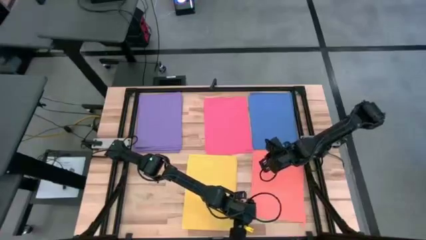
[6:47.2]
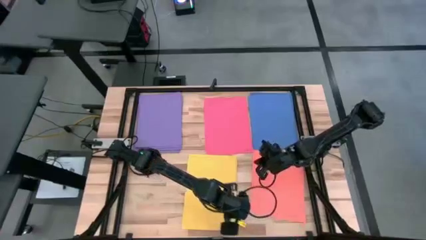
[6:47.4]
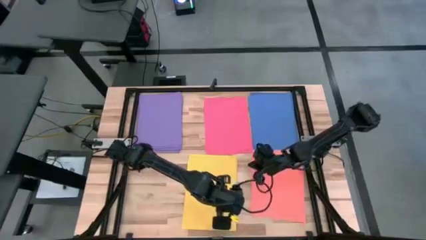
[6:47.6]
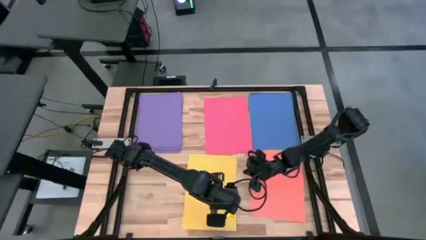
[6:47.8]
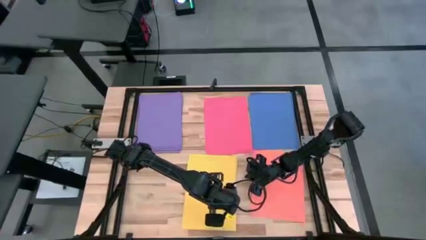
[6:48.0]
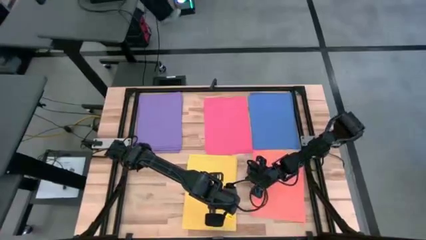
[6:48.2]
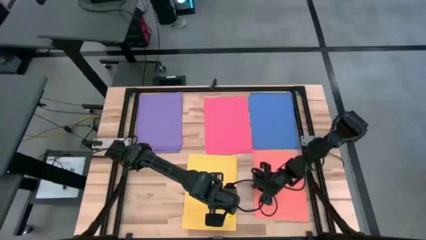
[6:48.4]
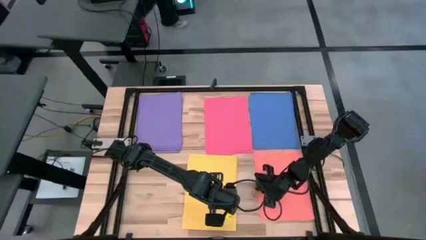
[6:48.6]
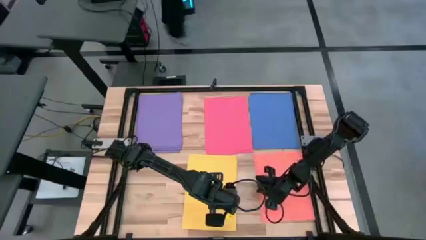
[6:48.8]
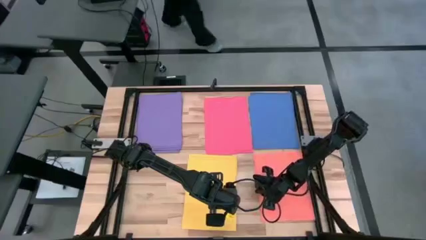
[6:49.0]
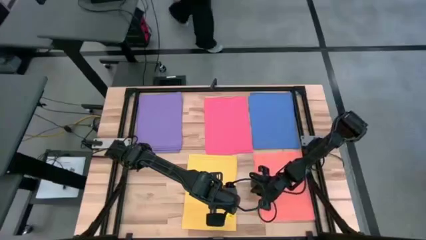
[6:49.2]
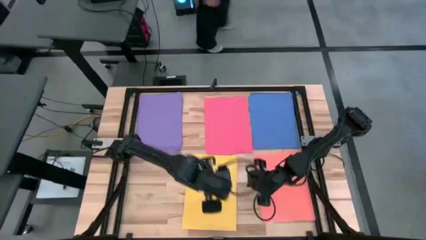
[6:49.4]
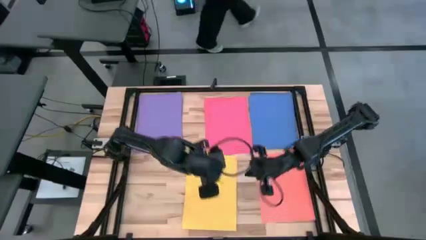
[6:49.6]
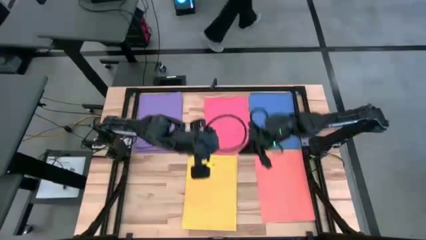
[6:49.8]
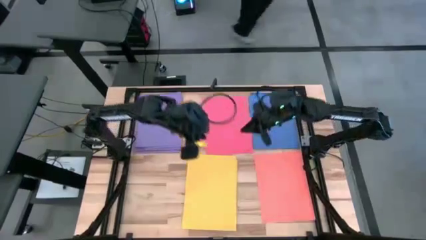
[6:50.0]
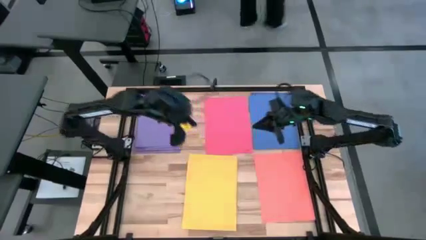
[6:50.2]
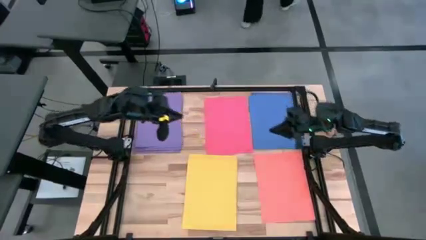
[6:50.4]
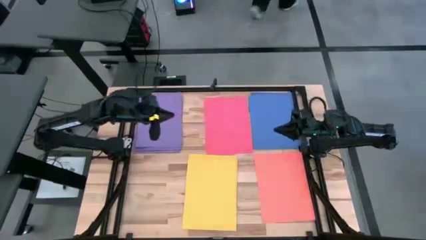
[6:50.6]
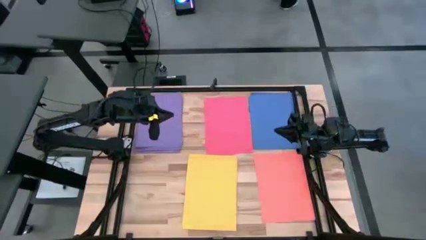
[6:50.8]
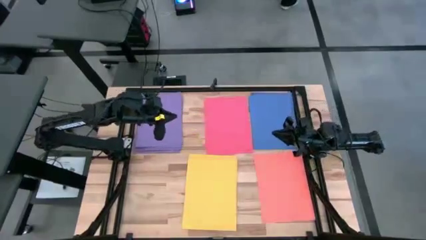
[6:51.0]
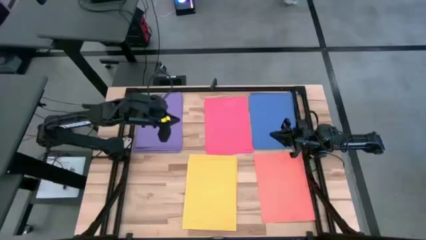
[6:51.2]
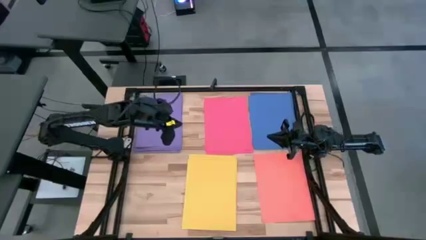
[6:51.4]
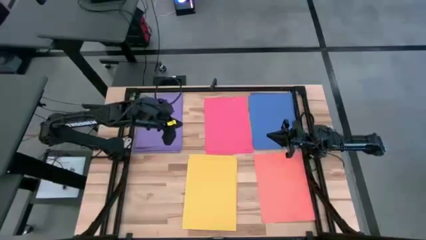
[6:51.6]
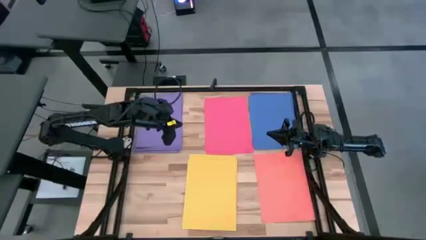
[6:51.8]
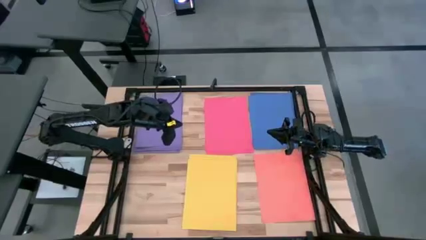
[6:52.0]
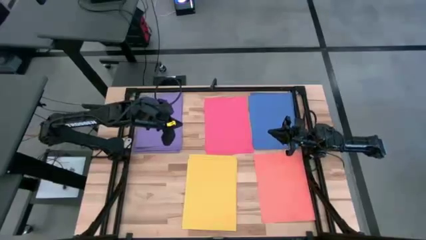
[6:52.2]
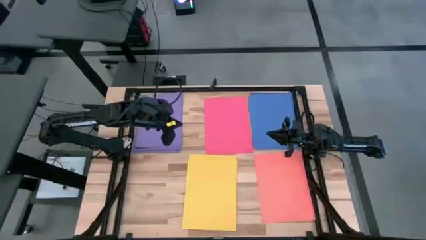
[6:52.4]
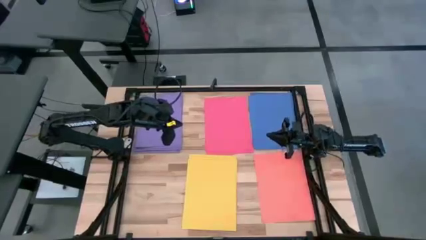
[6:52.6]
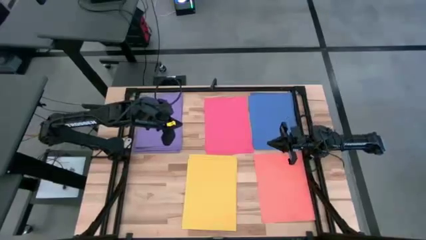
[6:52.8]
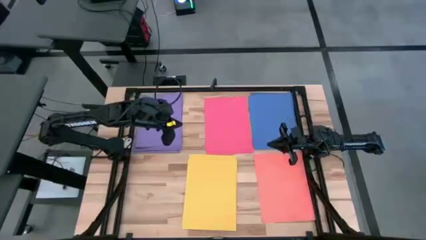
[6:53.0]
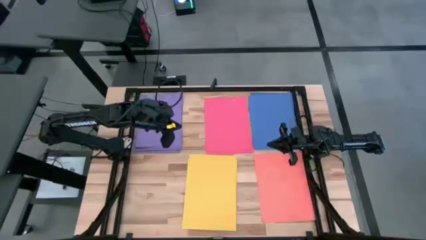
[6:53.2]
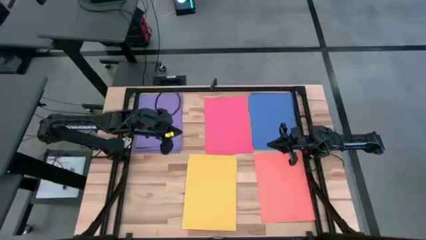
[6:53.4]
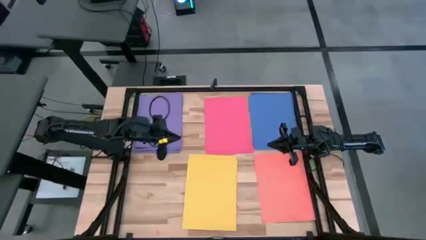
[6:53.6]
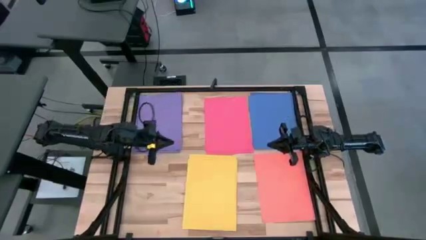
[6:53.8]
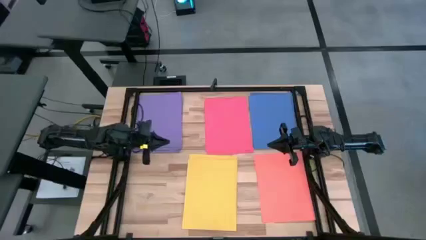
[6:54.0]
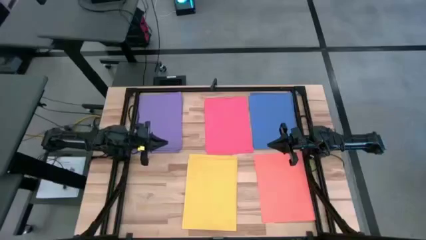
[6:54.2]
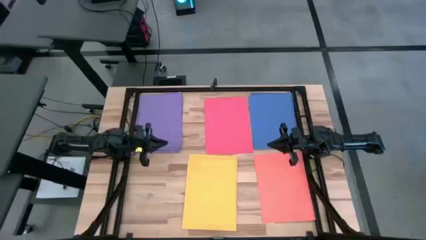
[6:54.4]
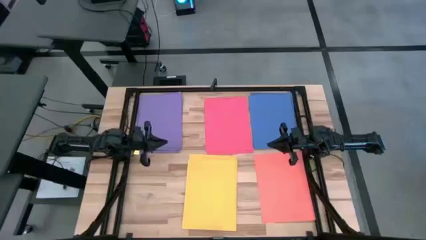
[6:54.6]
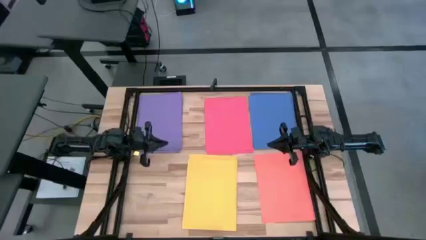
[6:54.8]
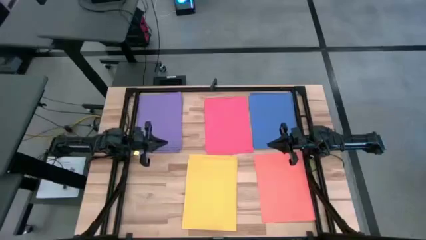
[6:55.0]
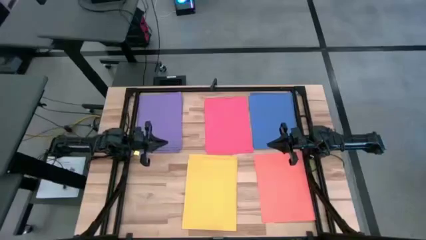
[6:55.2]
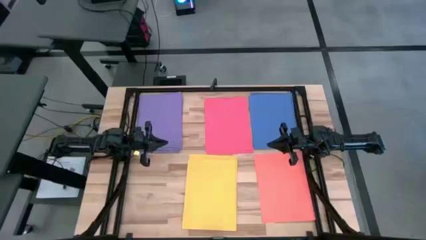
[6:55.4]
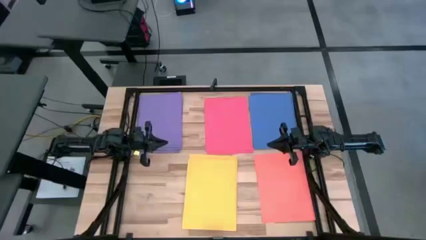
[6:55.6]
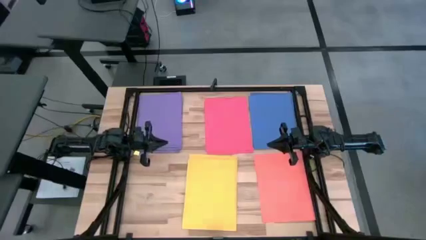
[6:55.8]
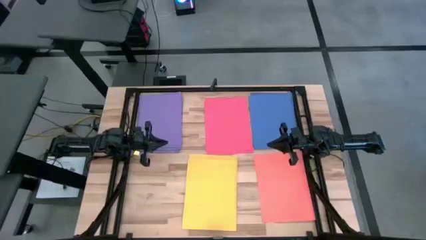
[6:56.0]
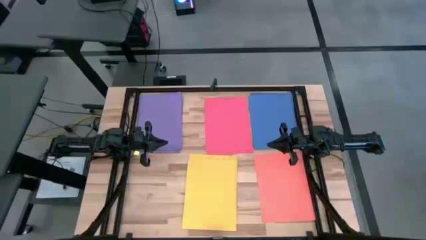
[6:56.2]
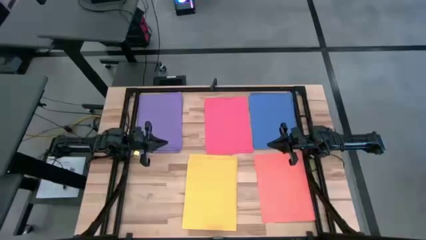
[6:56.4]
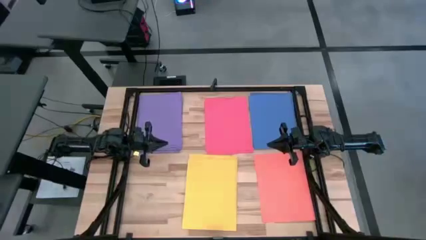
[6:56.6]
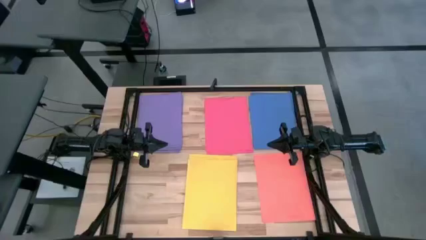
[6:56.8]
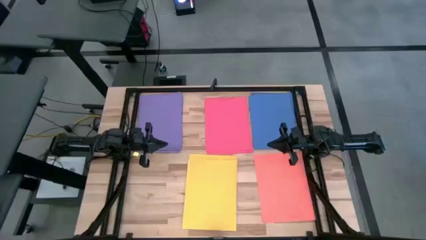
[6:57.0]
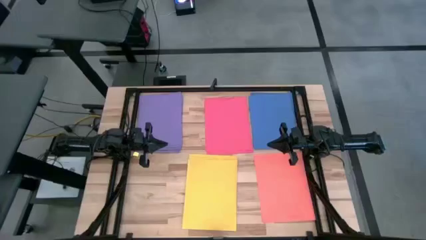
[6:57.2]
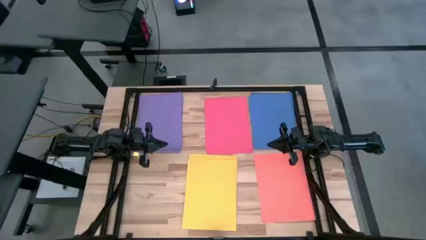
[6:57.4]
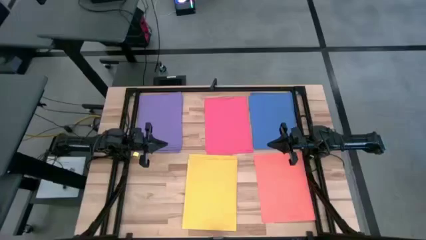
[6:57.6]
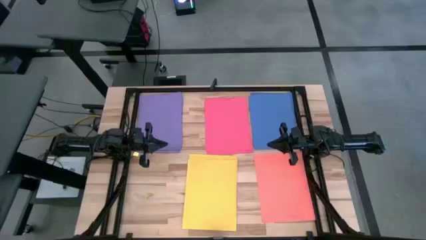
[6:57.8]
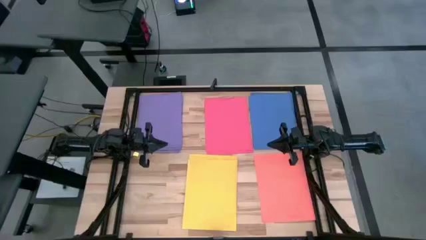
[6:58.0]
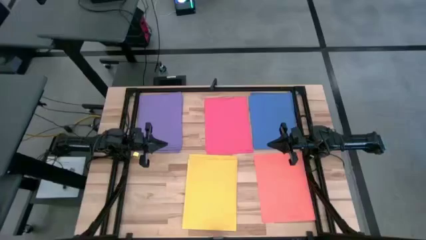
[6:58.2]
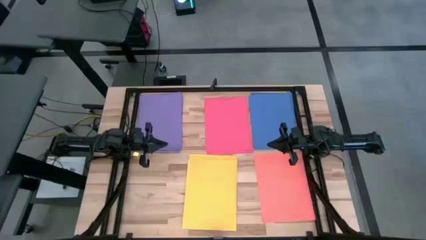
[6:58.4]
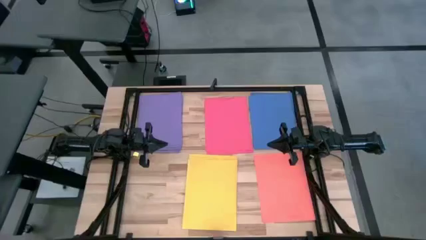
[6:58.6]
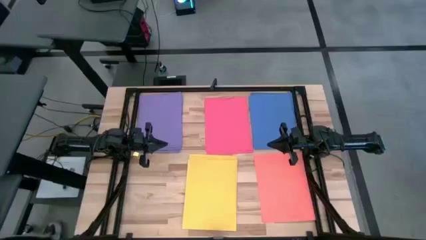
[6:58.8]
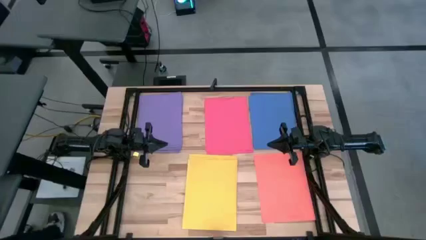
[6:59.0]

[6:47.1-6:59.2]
Task: Organize paper
Return to Home Position

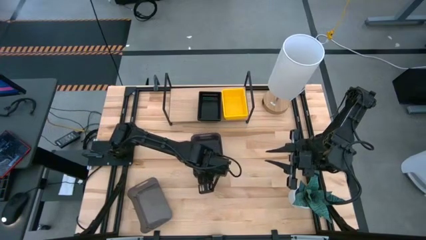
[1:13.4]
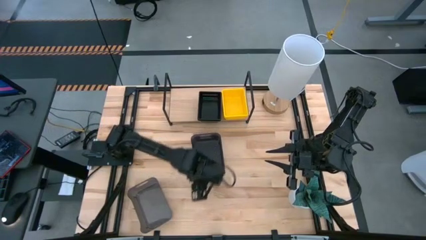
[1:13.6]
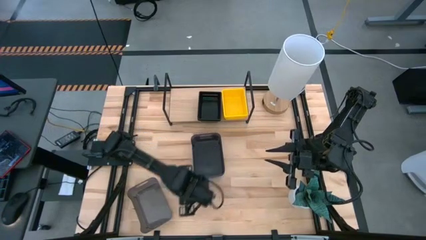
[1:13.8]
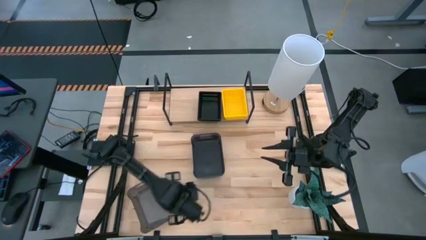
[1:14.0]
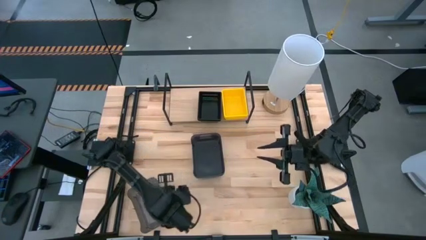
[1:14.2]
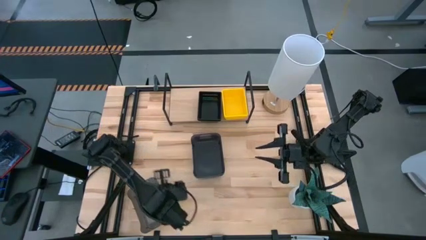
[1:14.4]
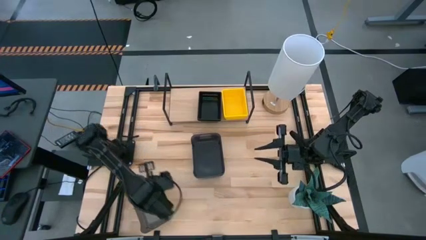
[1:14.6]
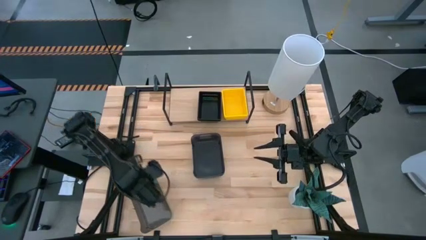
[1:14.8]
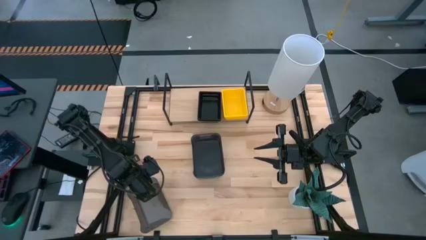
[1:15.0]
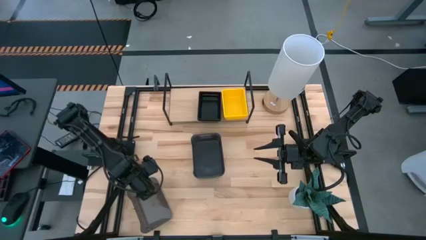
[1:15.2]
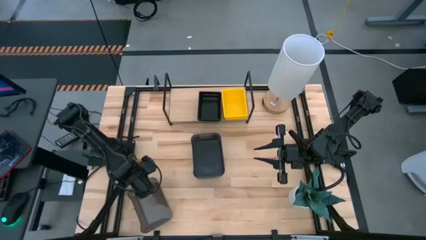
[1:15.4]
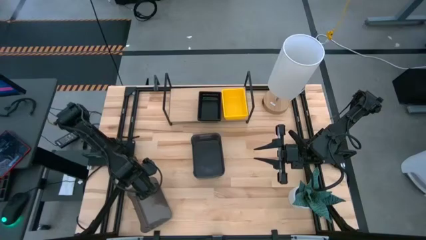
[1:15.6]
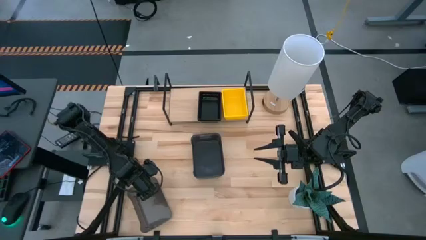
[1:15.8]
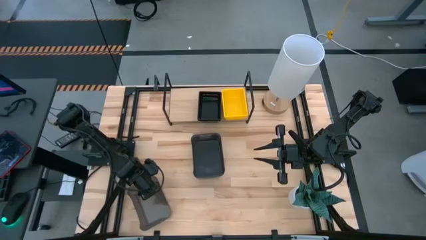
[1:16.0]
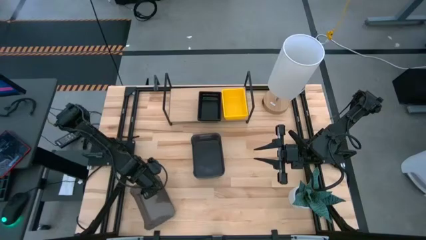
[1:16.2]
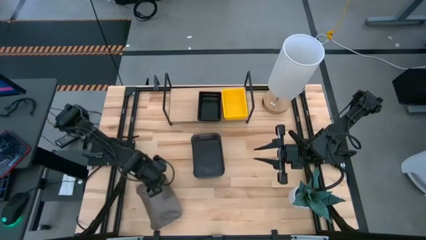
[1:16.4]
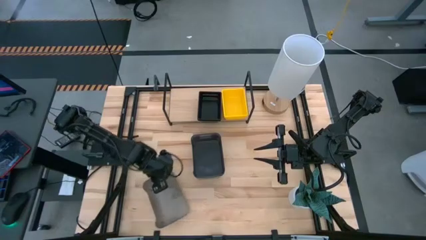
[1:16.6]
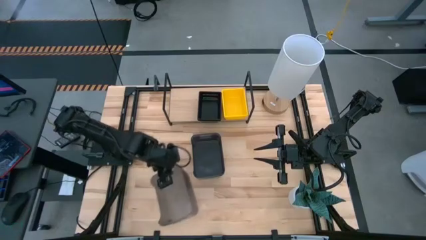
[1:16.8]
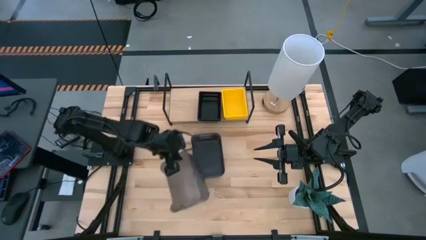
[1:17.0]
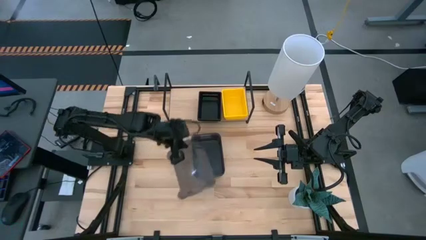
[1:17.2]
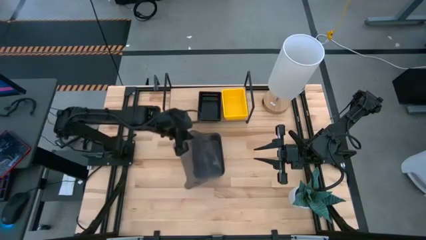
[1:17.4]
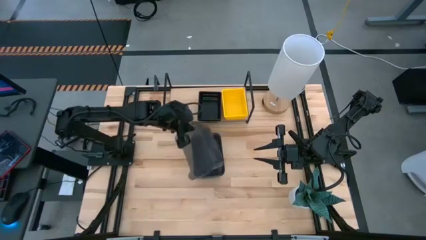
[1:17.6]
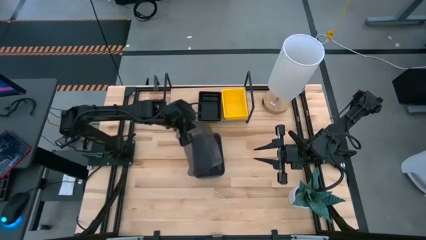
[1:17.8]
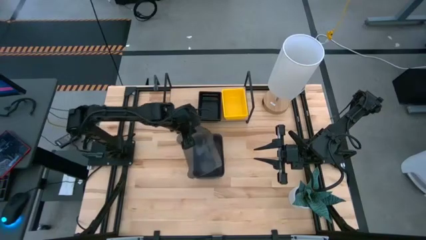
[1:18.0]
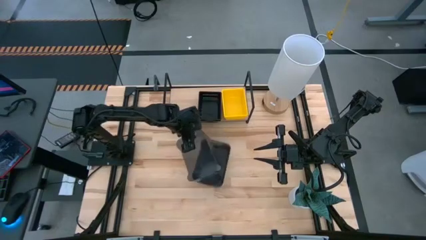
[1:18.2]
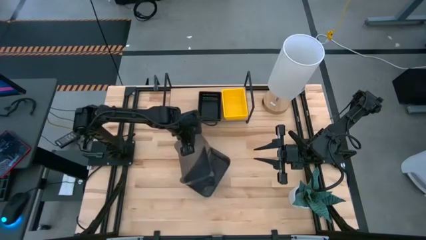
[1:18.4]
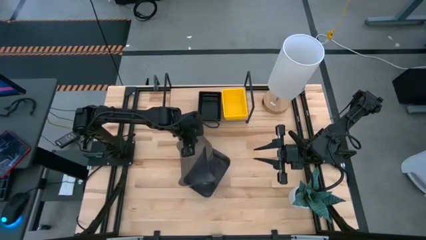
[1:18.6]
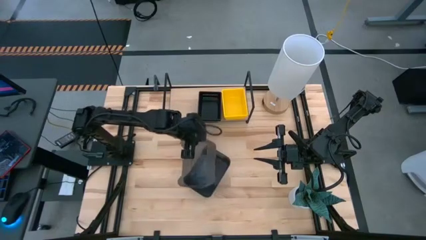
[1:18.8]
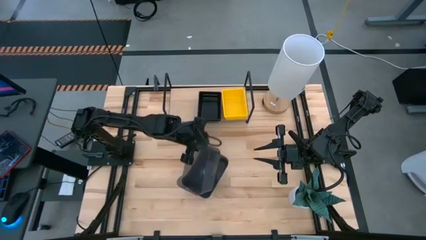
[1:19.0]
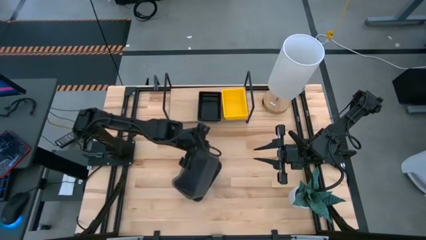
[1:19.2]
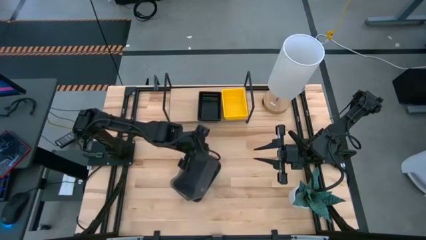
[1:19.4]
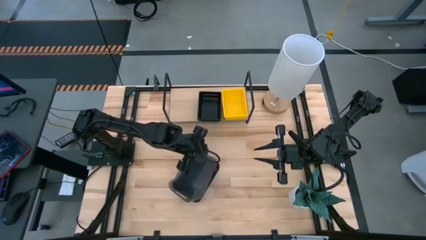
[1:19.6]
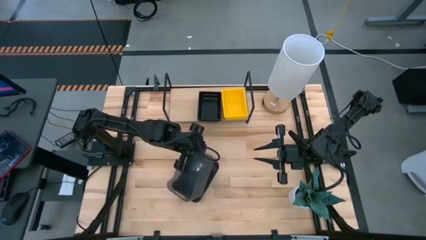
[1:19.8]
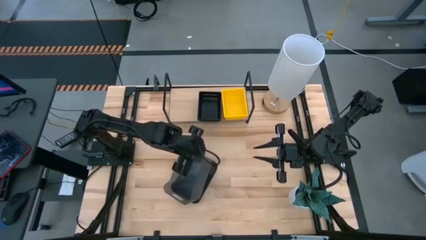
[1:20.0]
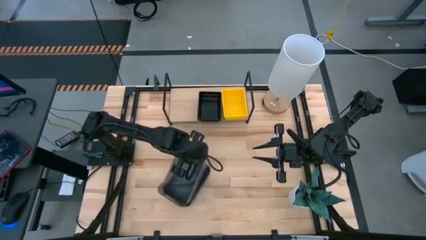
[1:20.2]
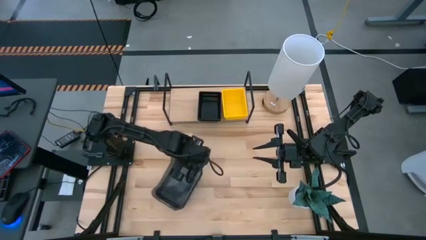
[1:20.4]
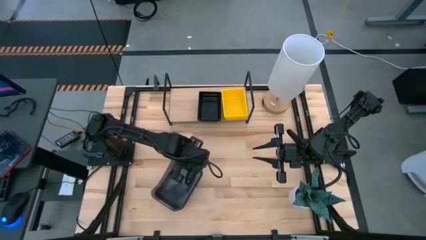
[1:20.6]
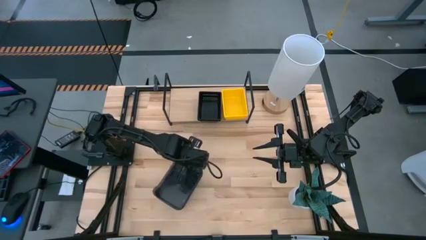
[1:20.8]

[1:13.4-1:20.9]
Task: Stack baskets on shelf by color
Stack the bottom gray bin on top of the gray bin
